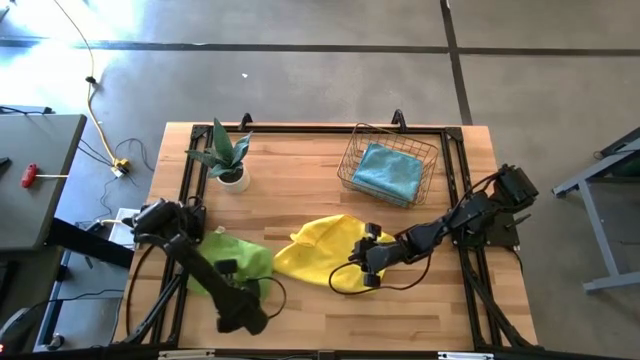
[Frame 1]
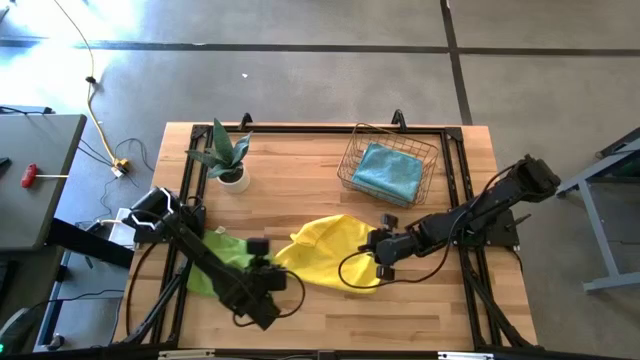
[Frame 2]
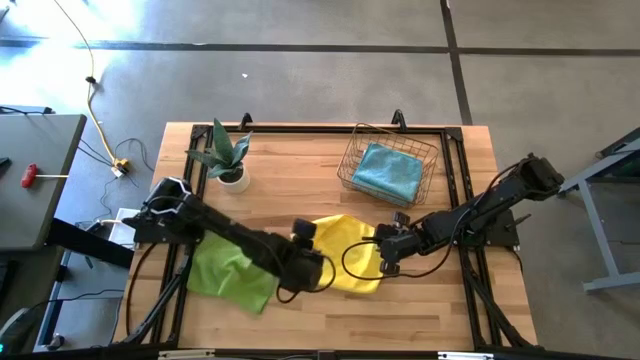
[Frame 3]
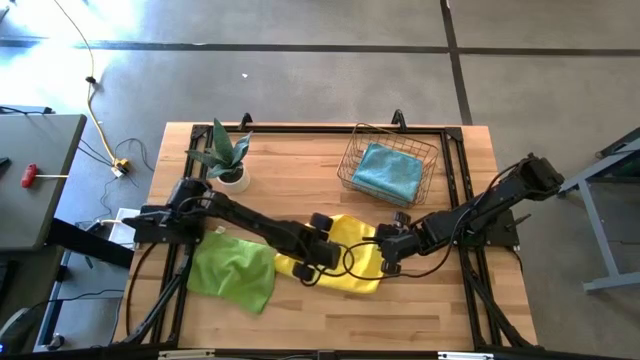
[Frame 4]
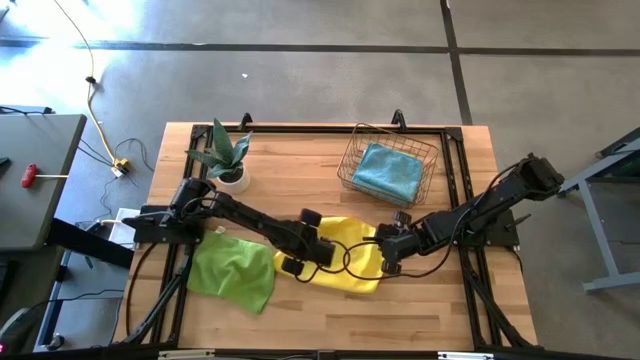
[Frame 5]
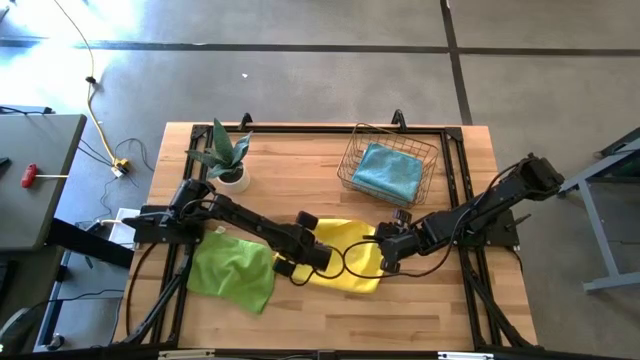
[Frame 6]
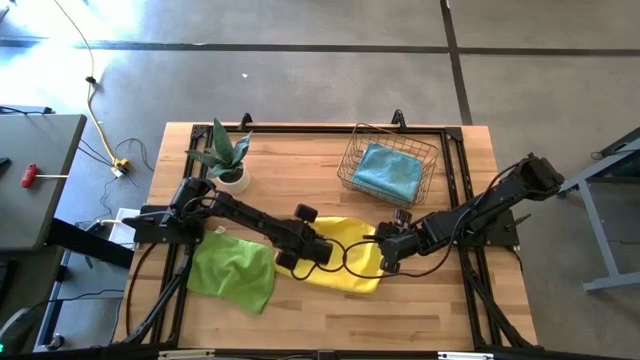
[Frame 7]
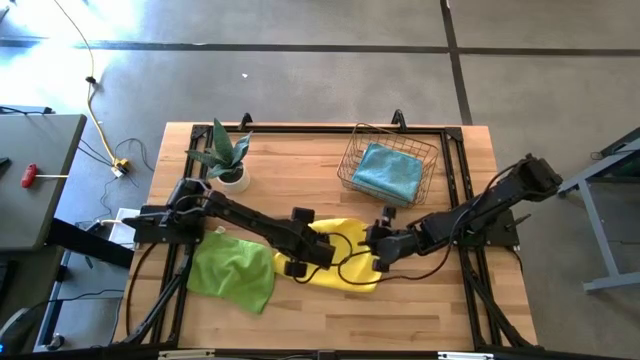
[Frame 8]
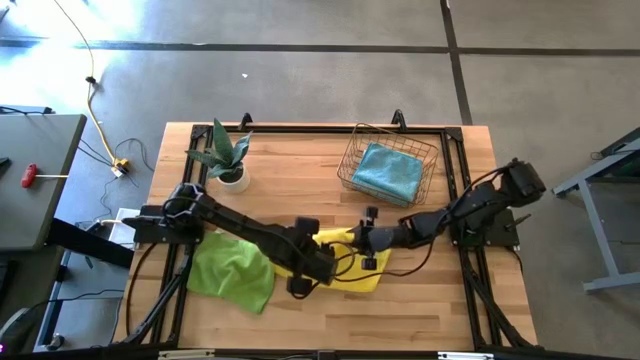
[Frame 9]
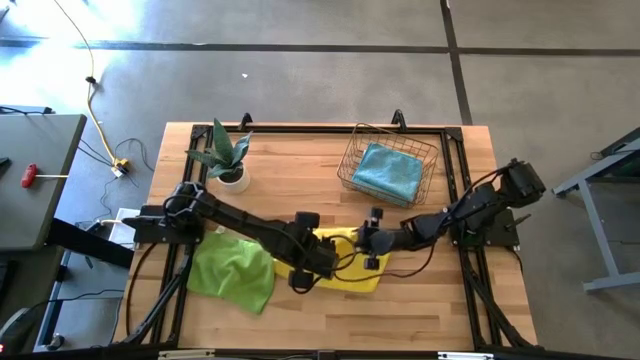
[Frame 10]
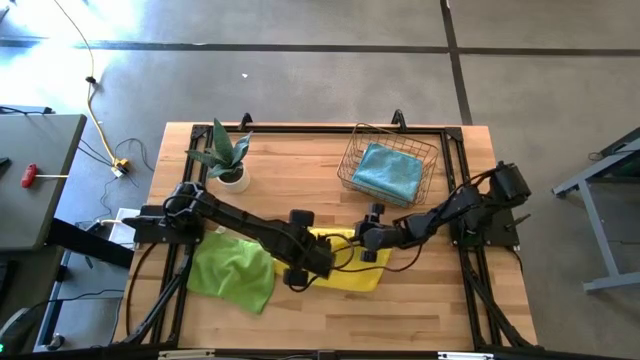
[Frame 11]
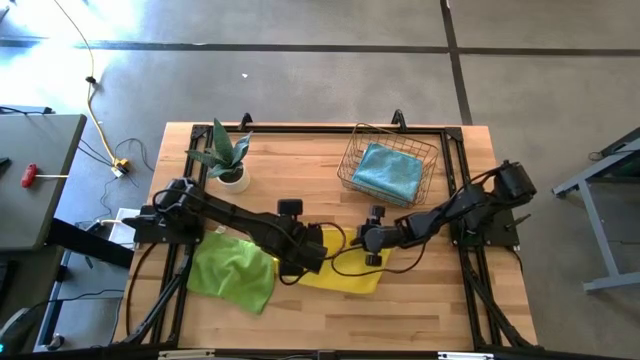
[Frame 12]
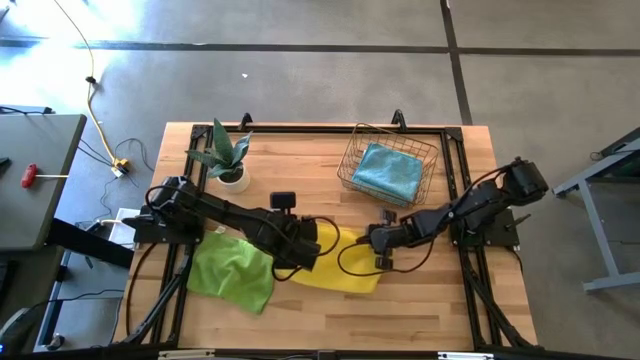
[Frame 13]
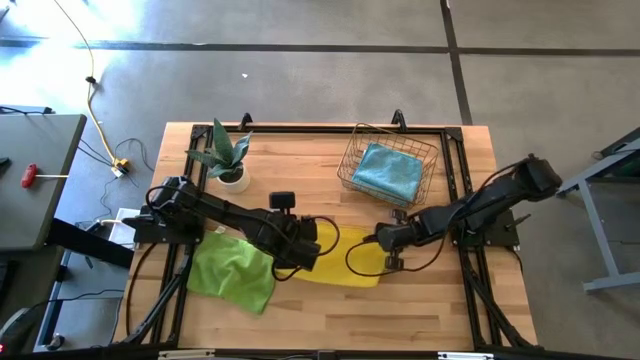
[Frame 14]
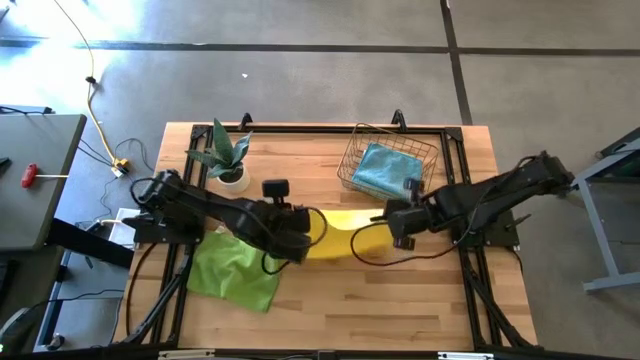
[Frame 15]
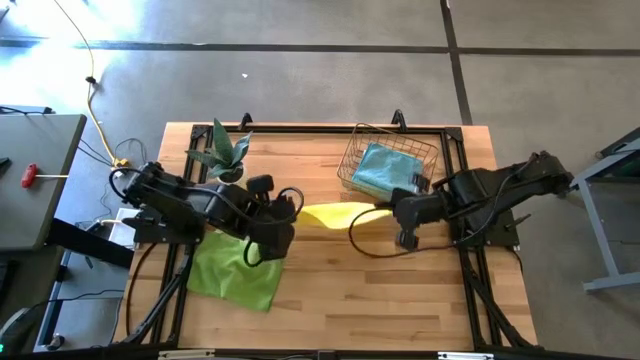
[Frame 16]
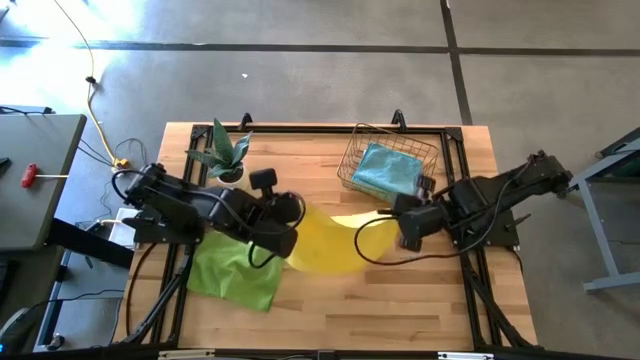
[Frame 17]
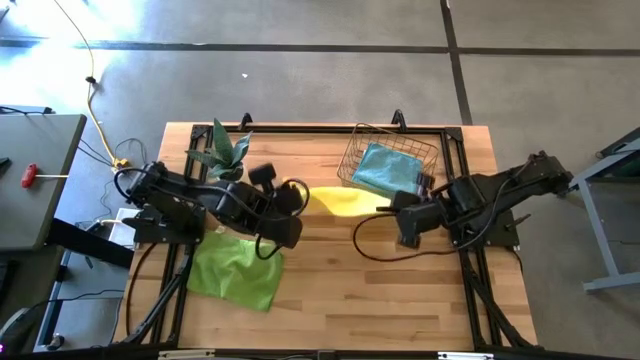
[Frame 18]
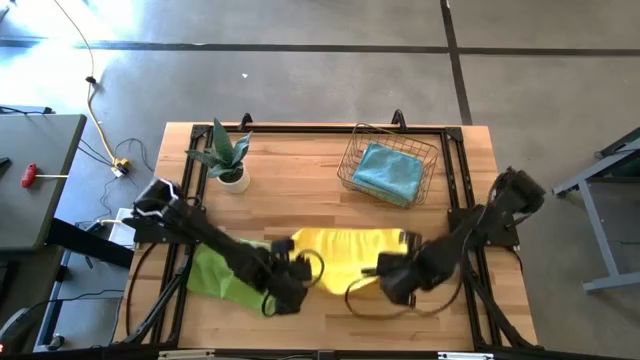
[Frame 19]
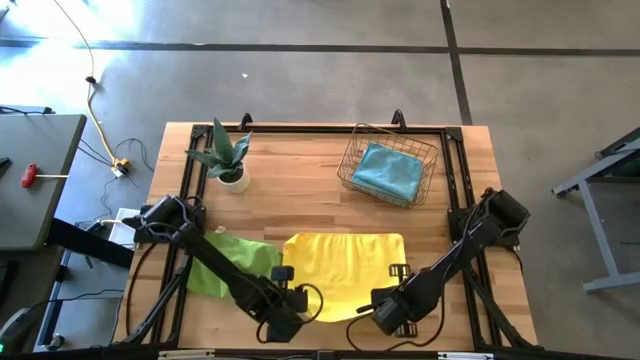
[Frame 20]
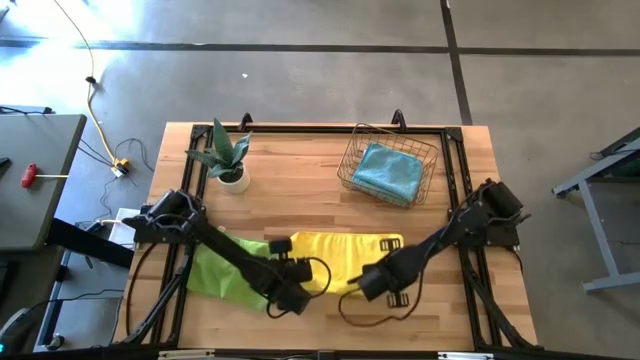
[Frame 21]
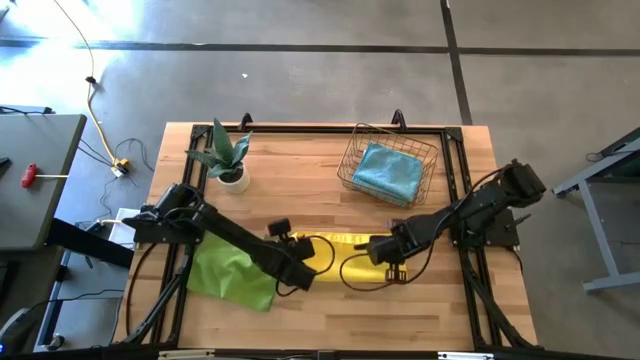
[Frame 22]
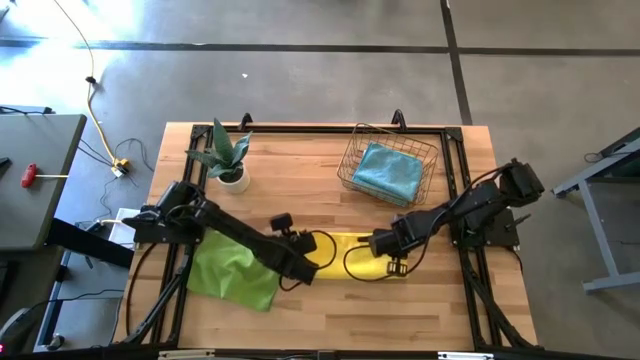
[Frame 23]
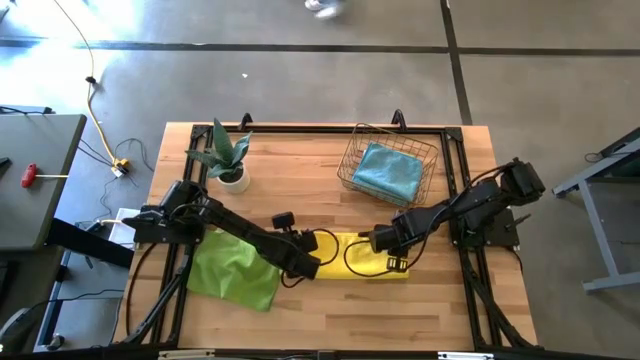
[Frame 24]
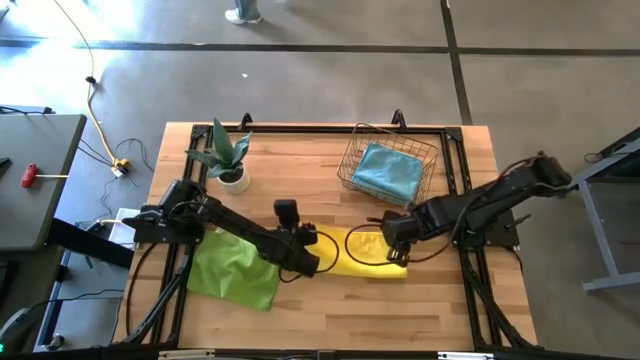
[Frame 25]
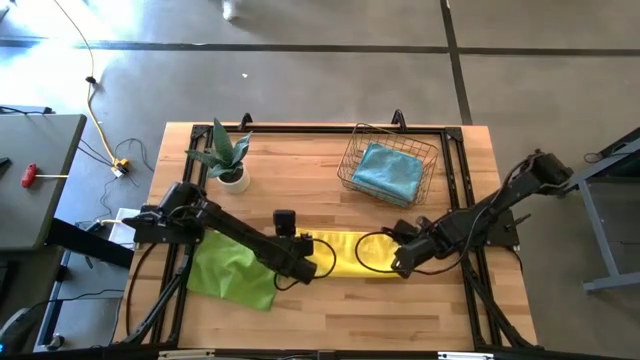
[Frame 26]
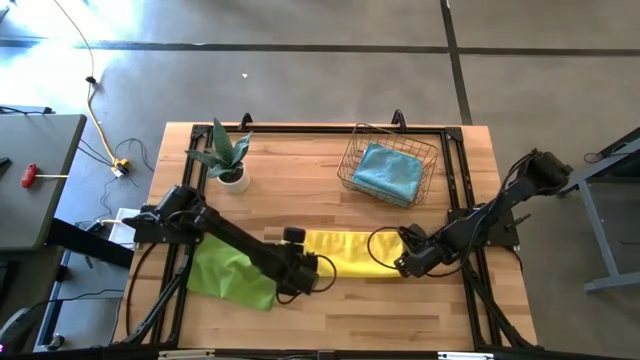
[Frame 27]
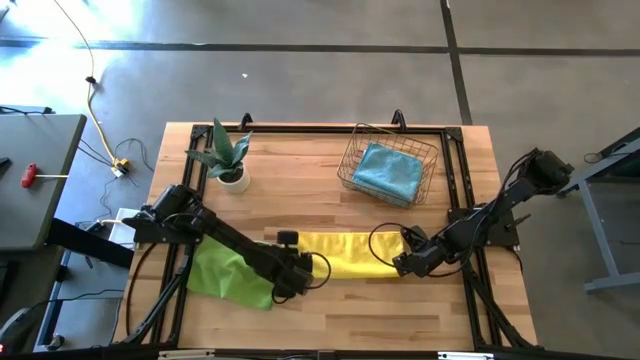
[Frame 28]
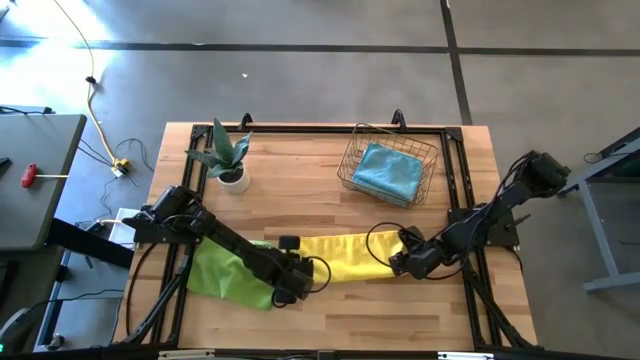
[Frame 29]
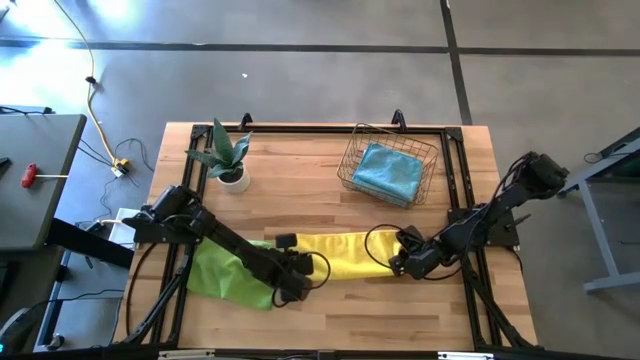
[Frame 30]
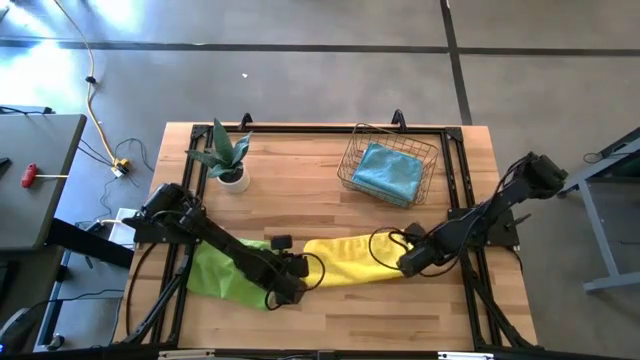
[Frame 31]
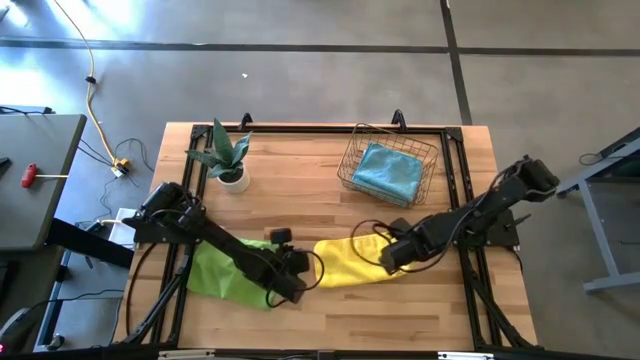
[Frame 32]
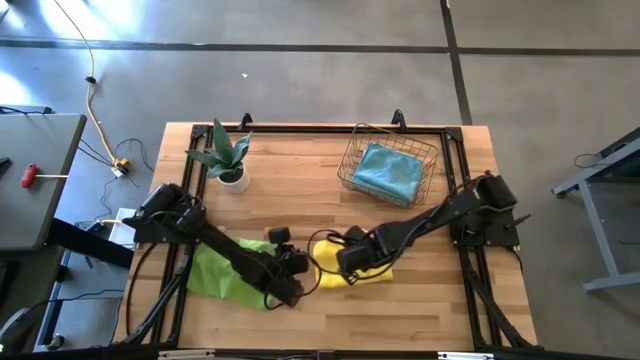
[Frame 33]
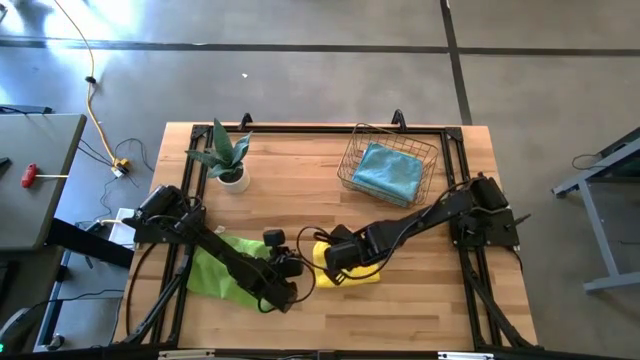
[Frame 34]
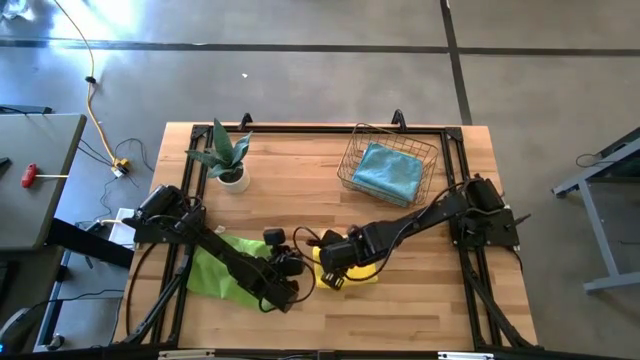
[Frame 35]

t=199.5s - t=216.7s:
Task: Fold microfiber towels
Fold the yellow microfiber towel

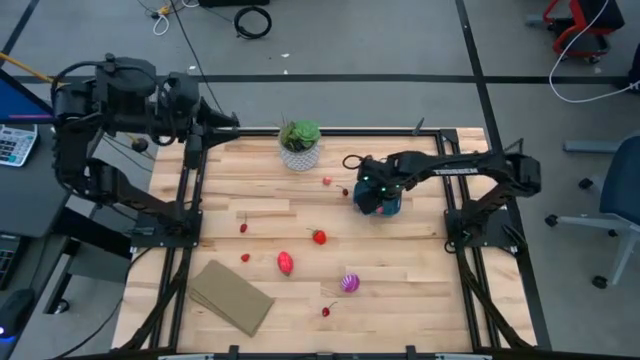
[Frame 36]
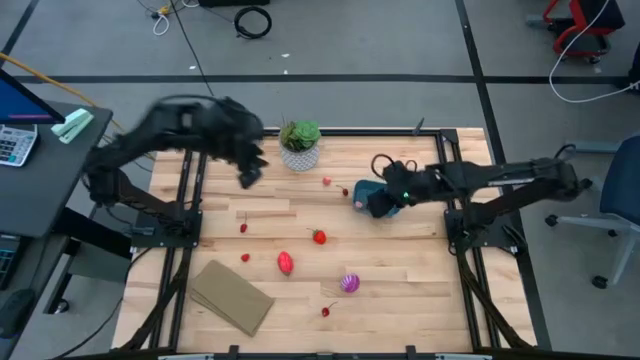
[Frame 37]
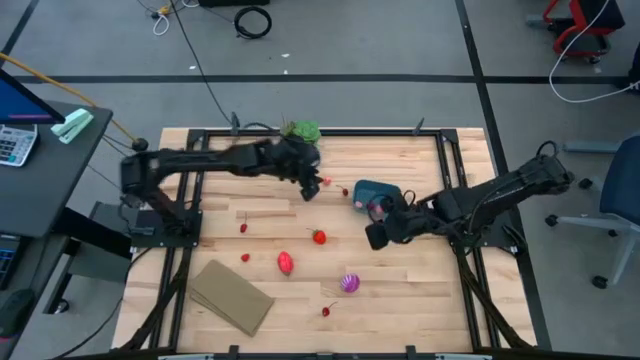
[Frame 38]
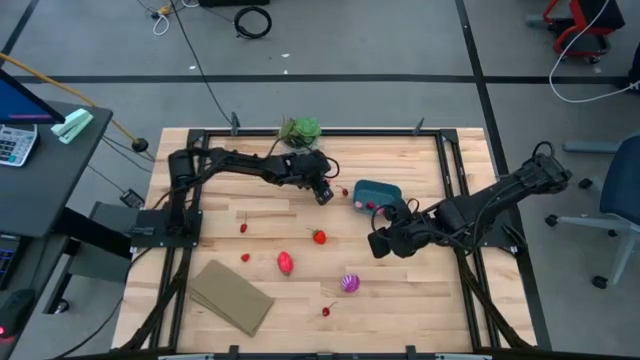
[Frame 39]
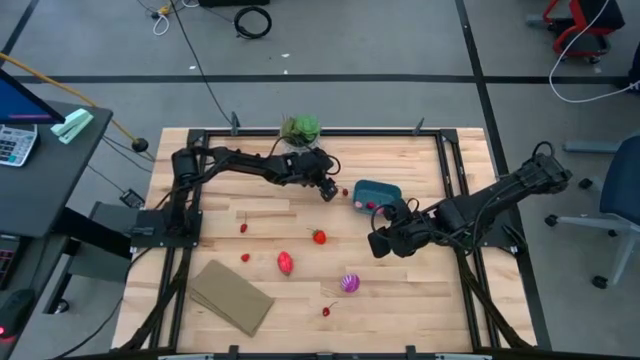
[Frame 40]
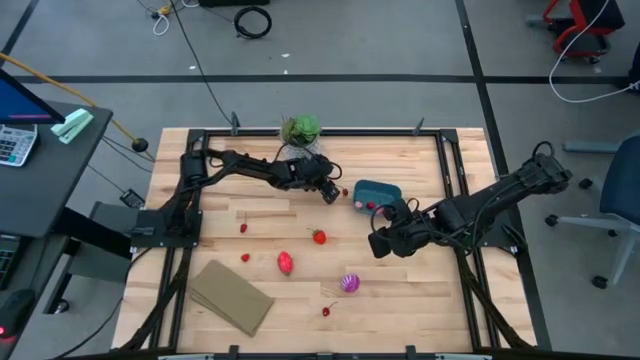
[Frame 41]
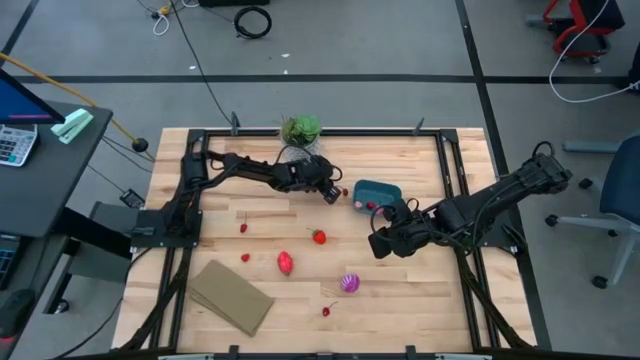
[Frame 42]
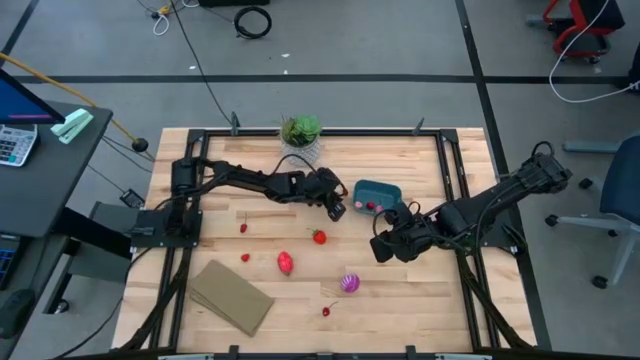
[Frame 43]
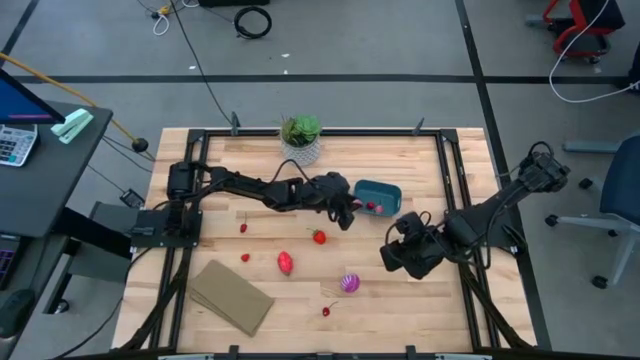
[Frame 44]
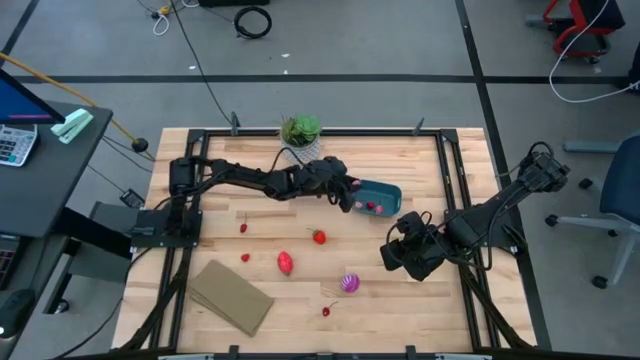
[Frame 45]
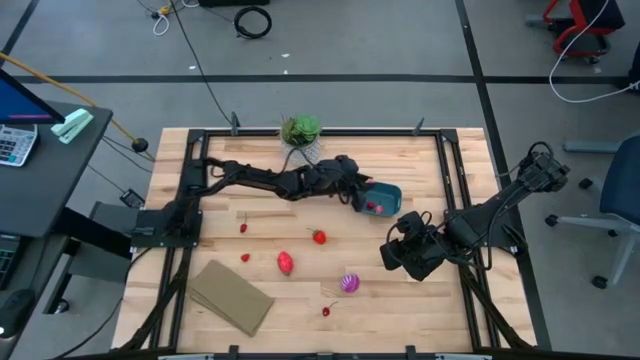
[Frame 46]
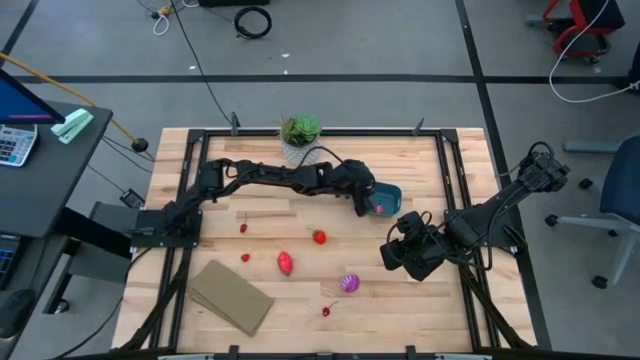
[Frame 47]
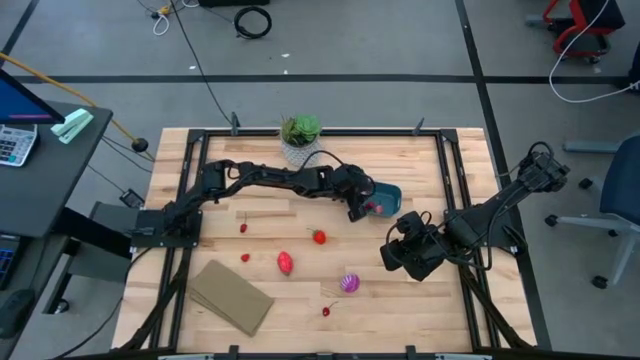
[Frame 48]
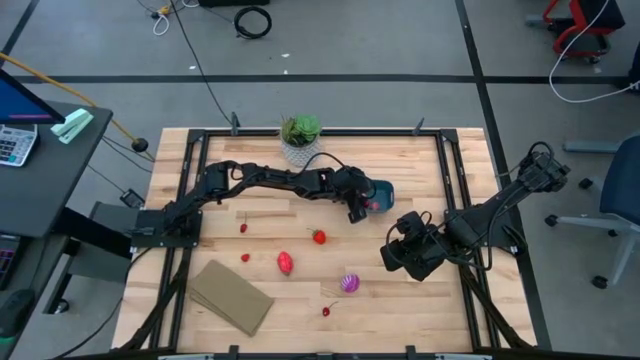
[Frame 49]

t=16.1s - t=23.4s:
Task: Pick and placing Produce into tupperware
Put the pink peach into the blue bin
